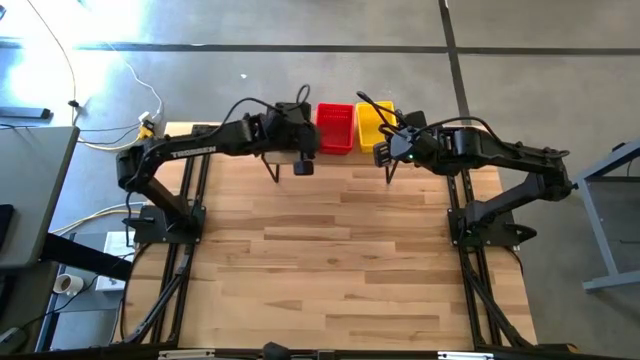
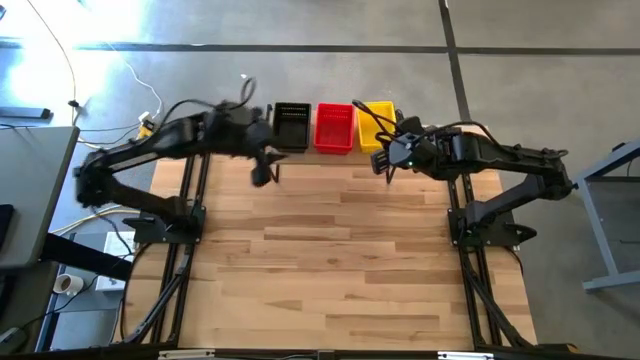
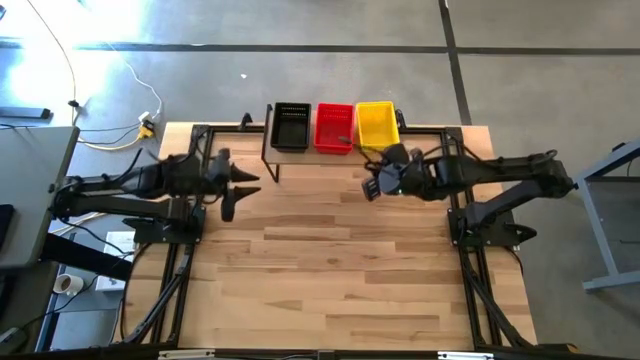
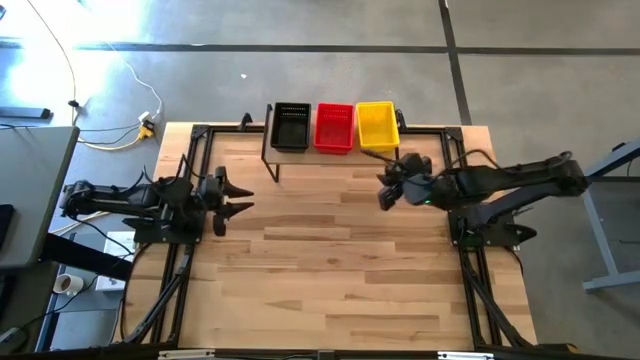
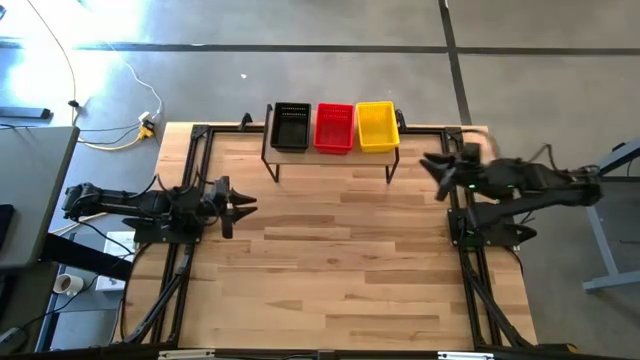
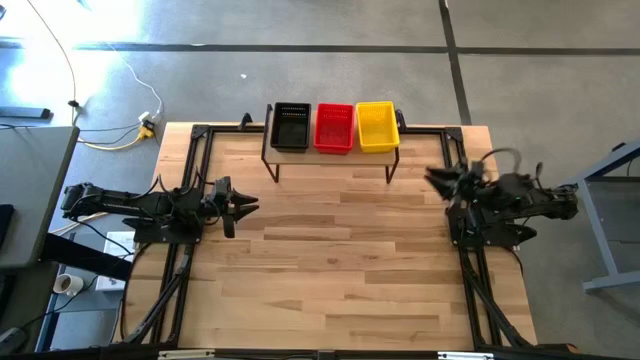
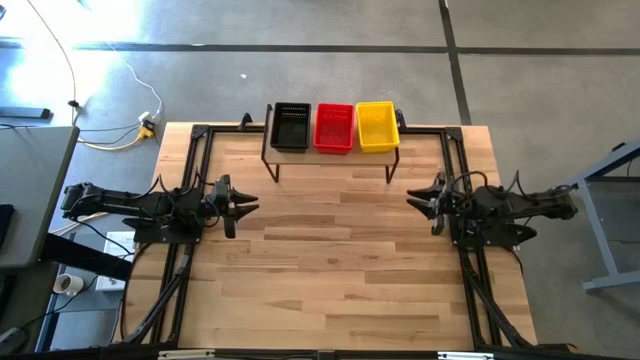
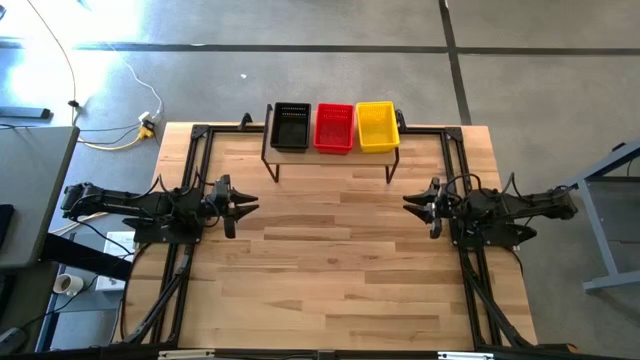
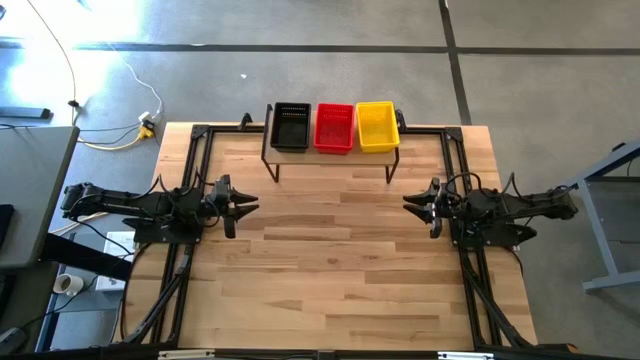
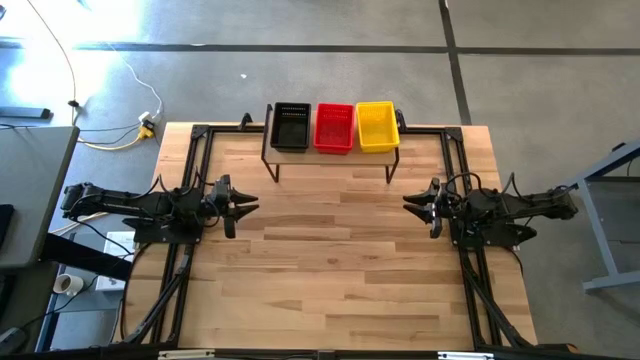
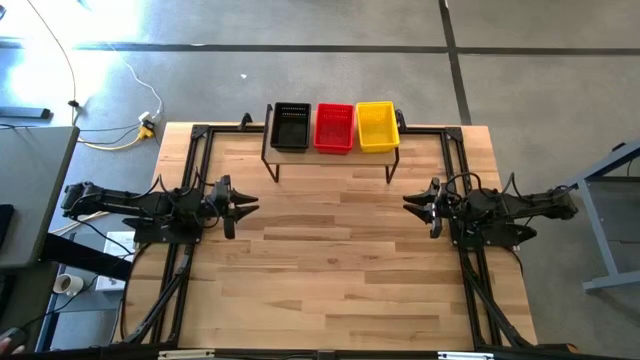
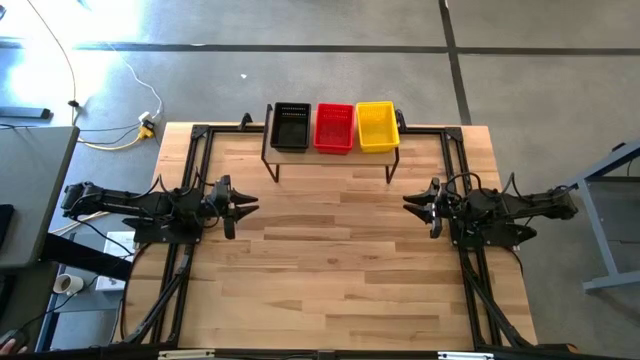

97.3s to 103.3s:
Task: Stack baskets on shelf by color
Return to Home Position

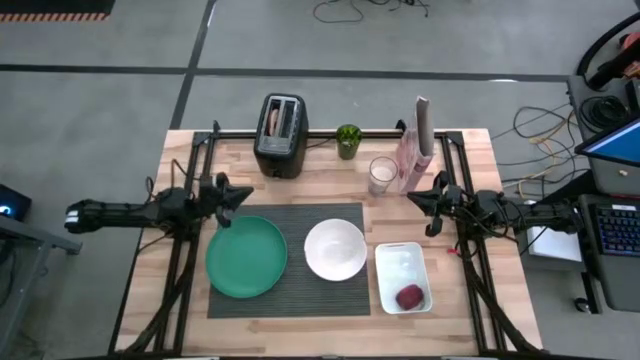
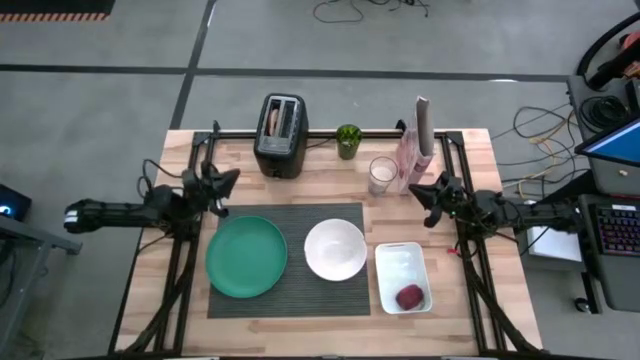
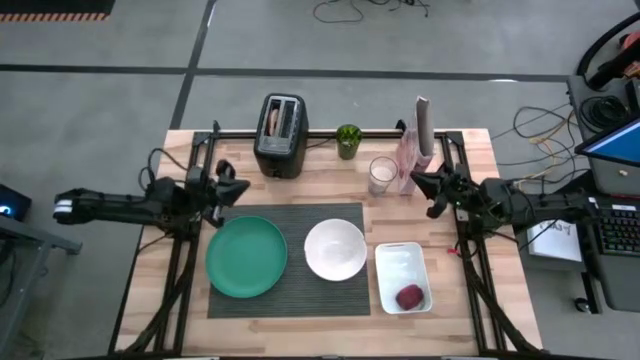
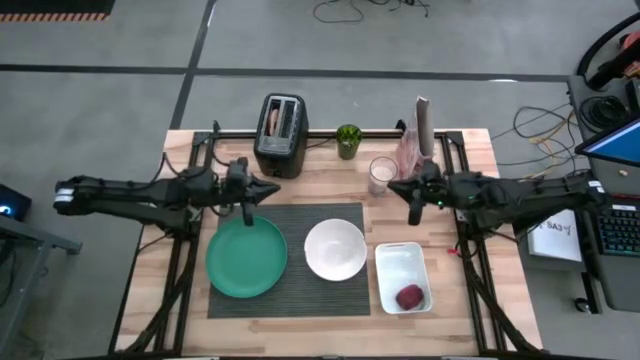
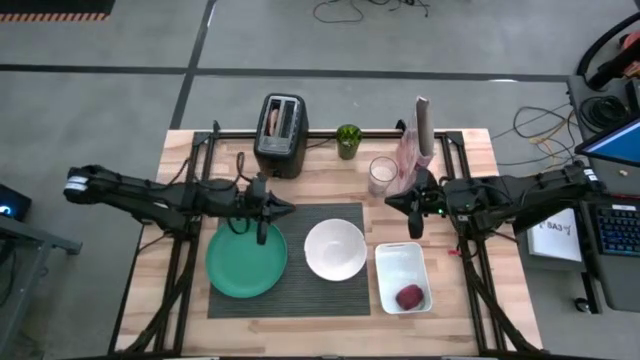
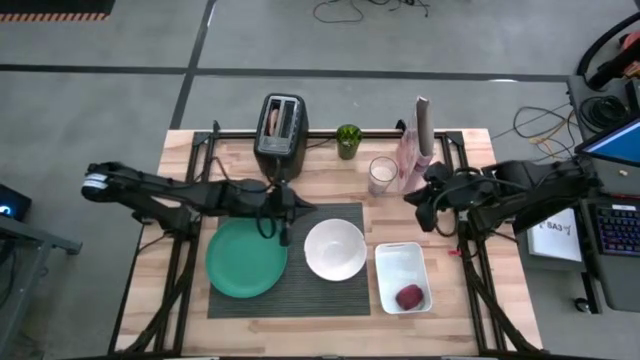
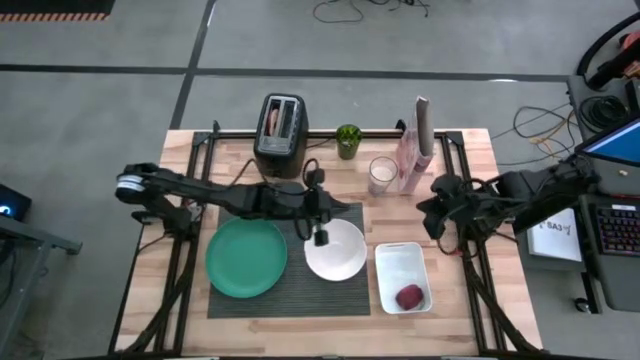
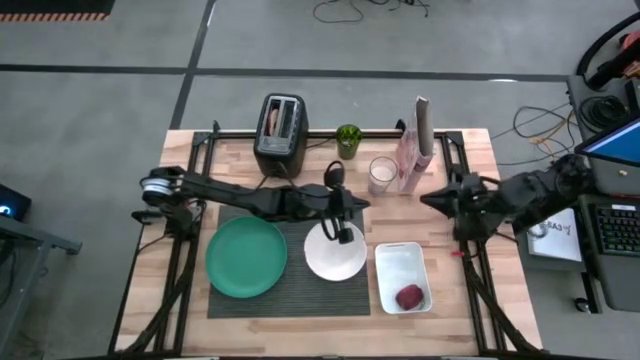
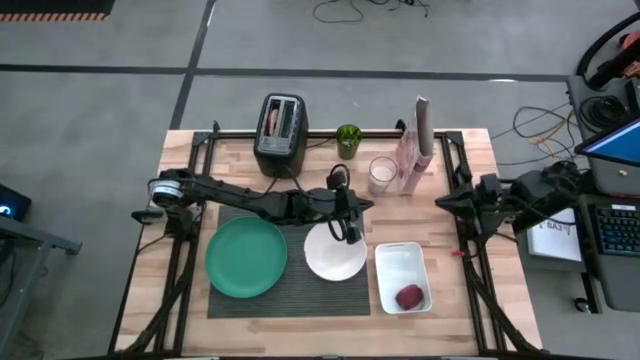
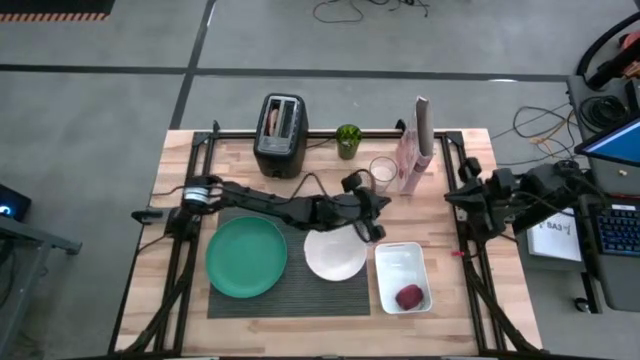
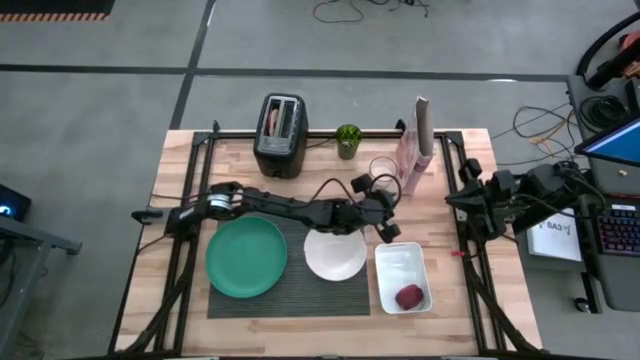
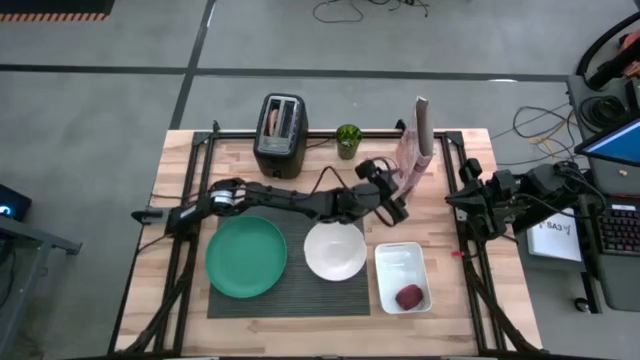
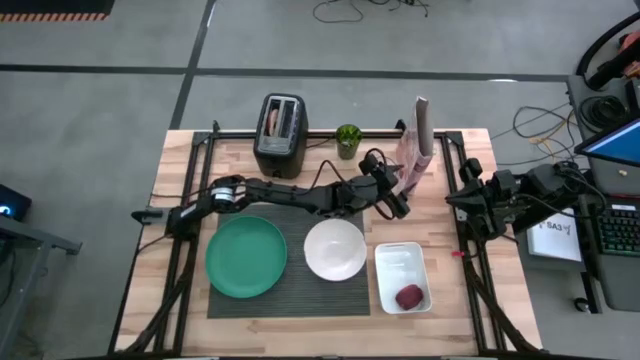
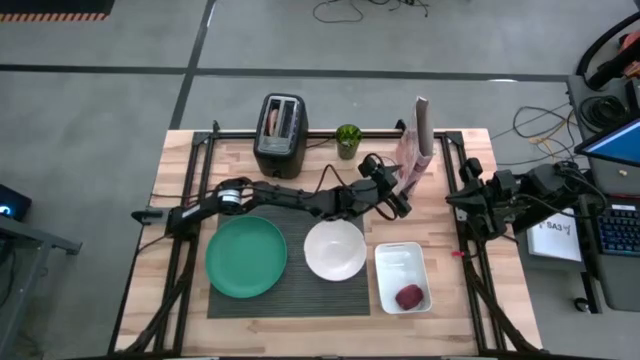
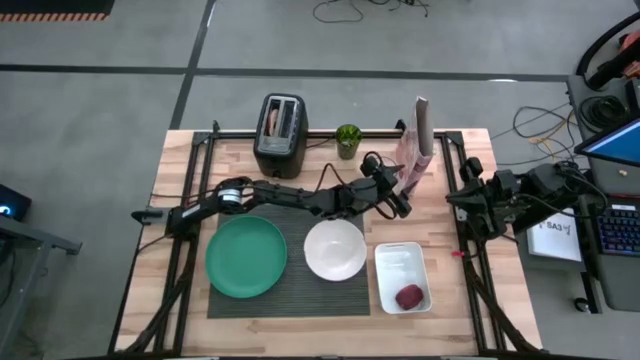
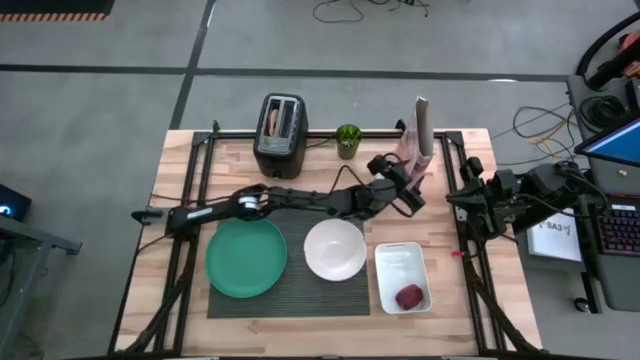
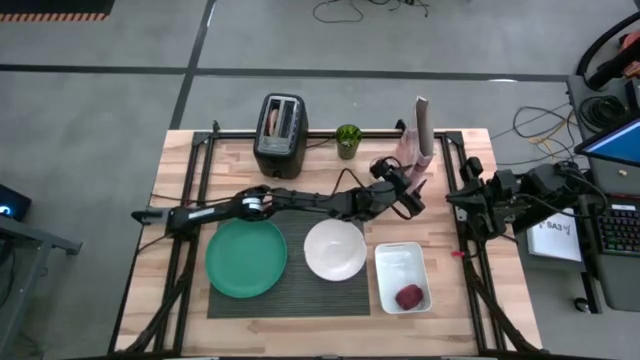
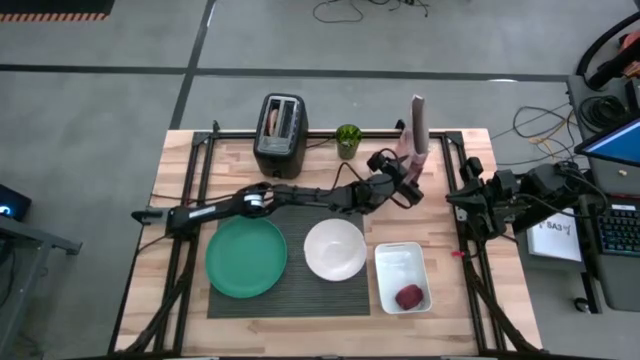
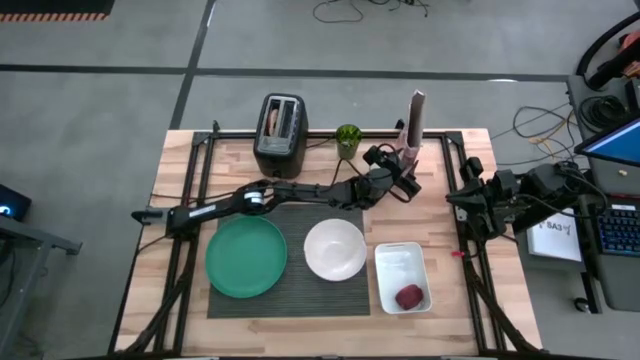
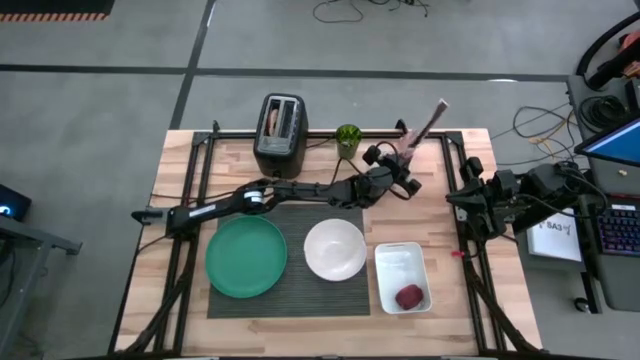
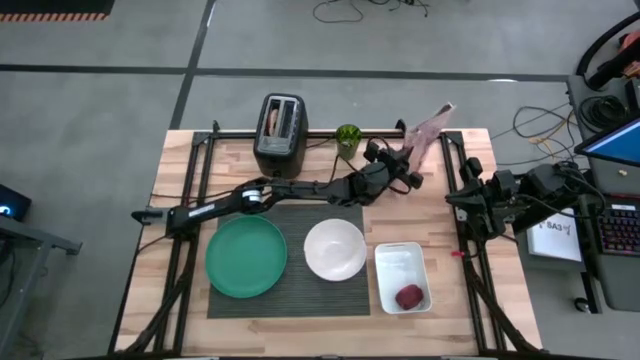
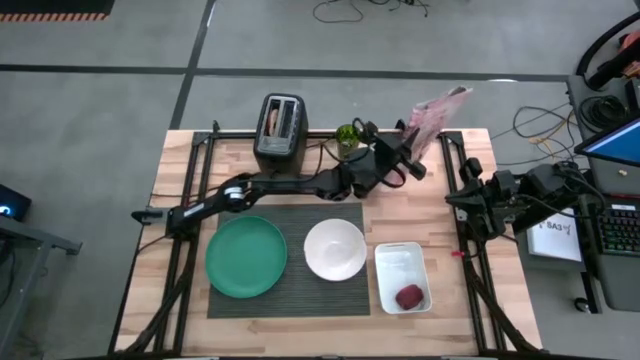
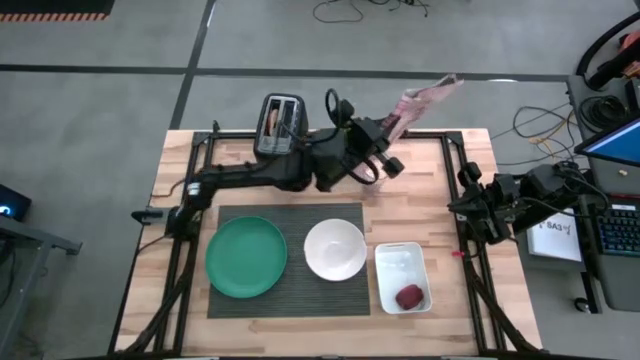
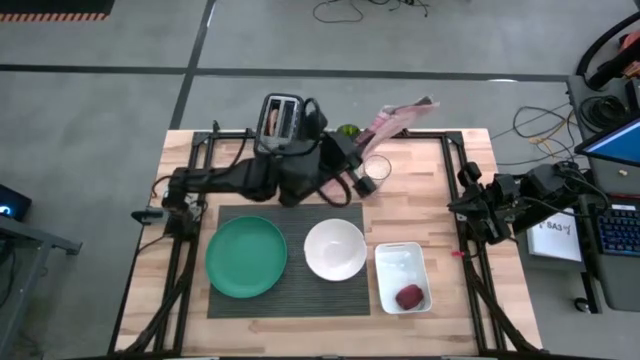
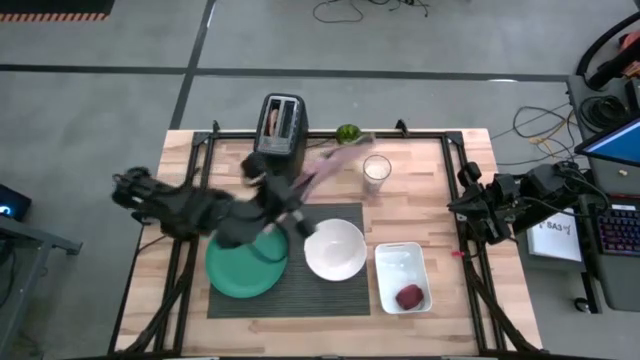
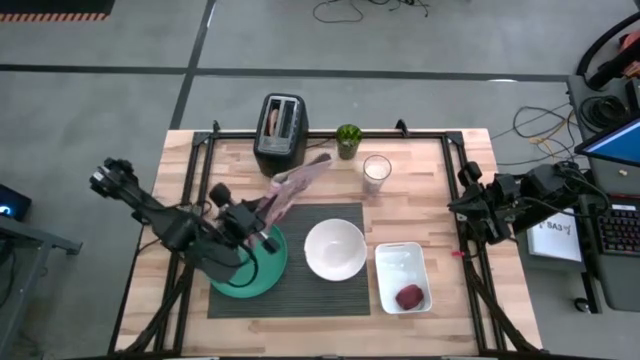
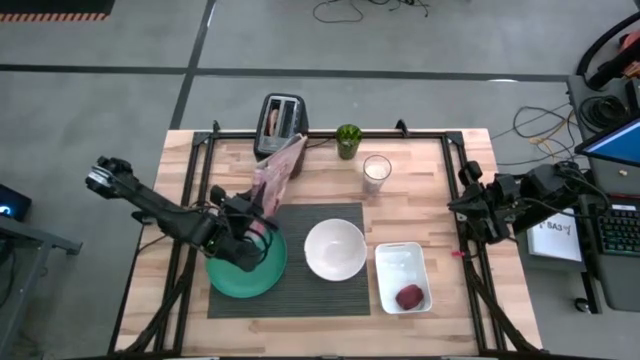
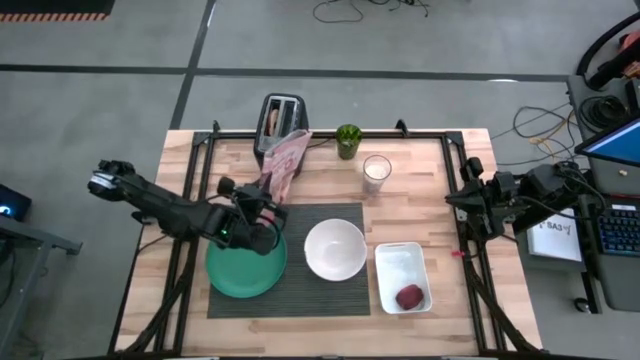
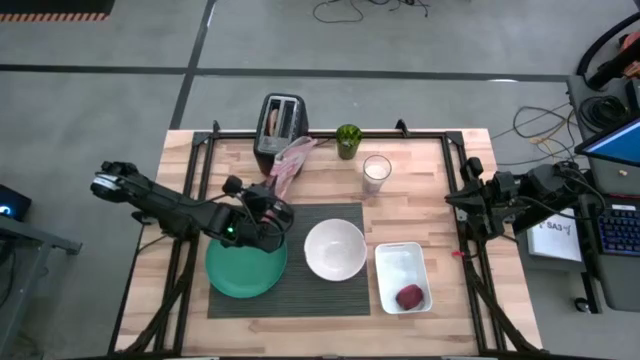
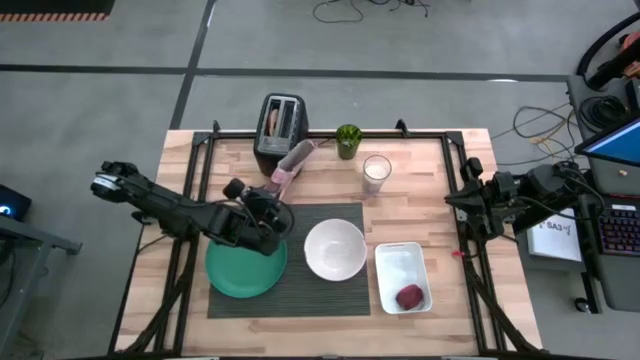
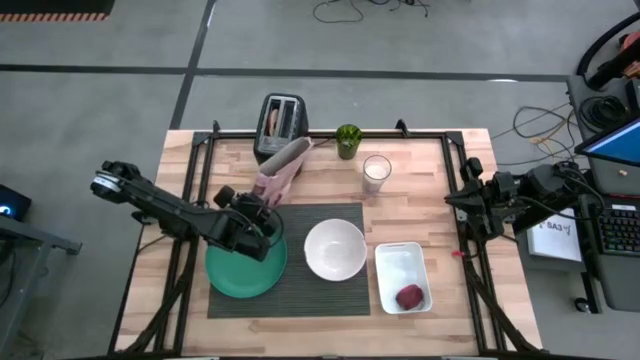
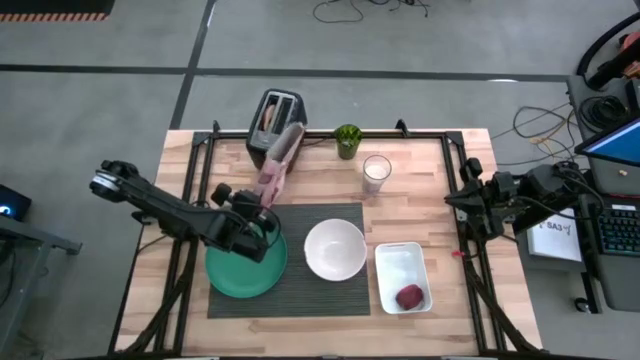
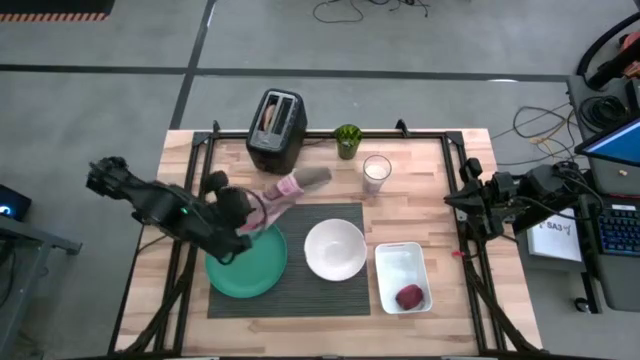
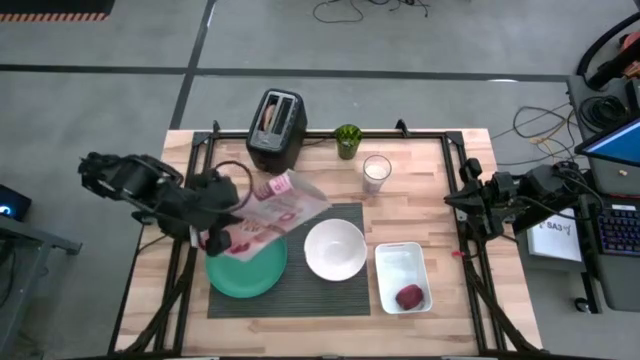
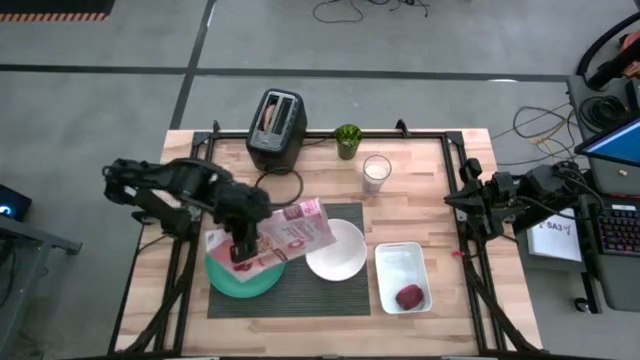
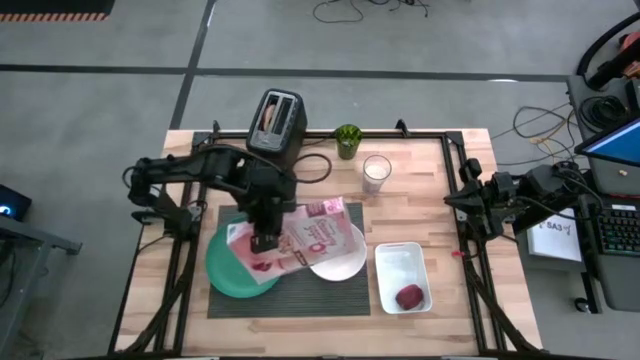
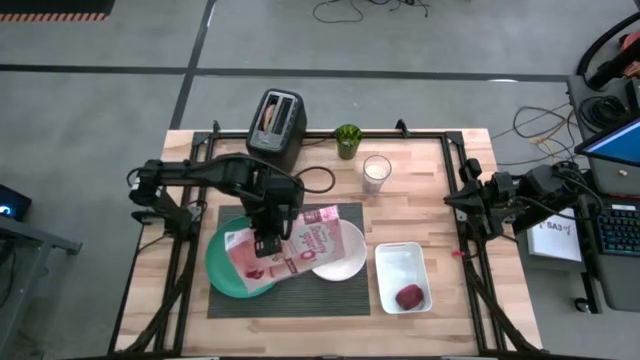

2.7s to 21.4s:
Task: Arrange a breakfast setting
Pour the cereal into the white bowl
